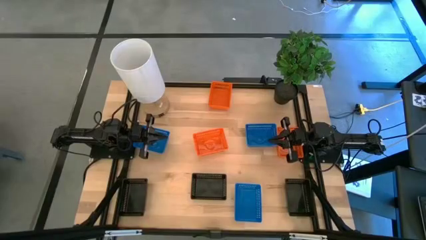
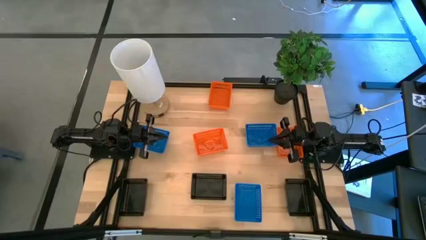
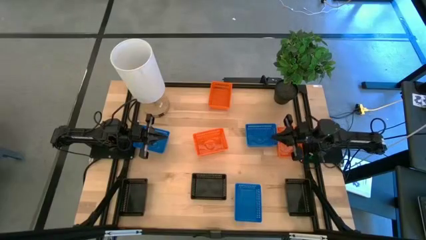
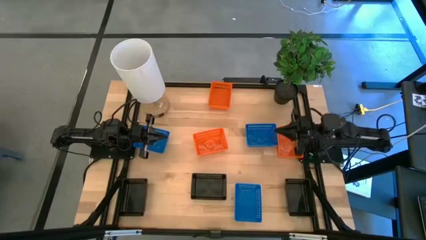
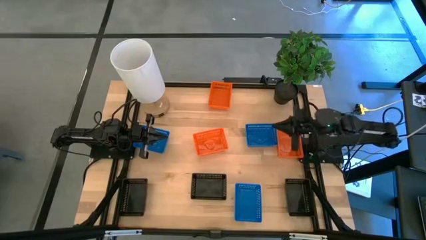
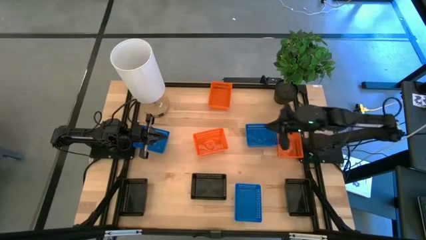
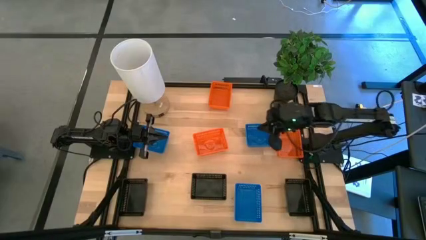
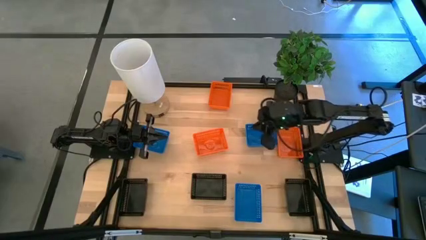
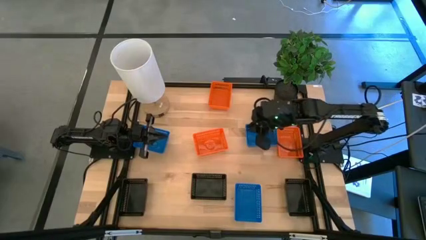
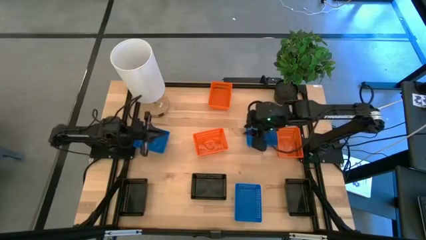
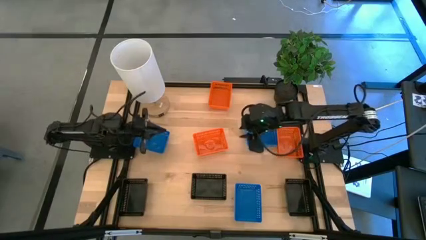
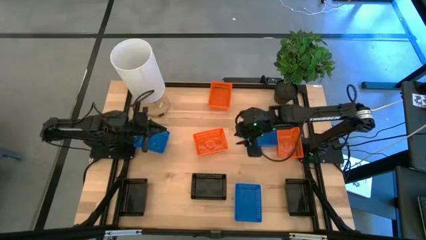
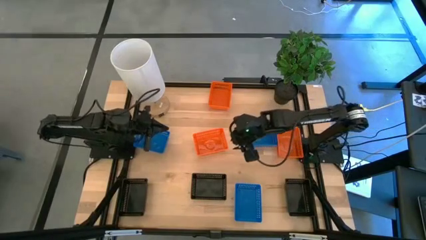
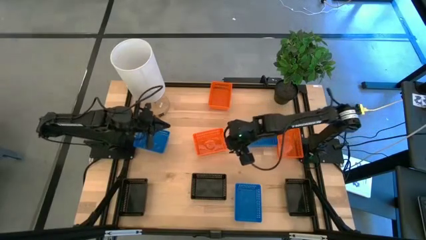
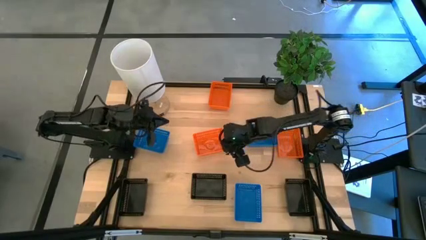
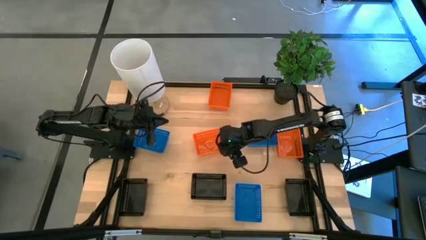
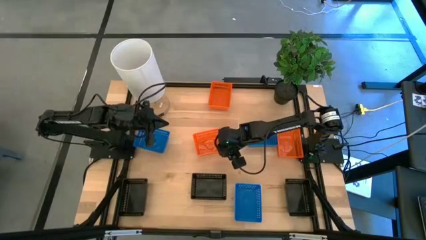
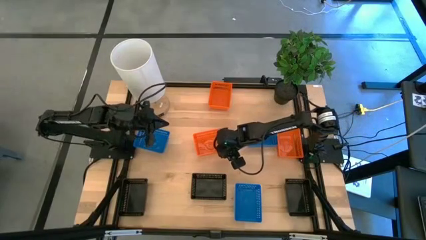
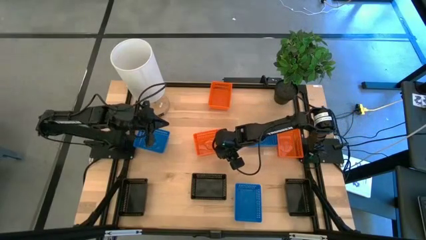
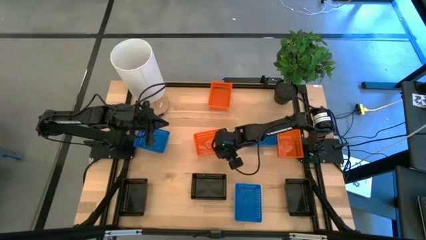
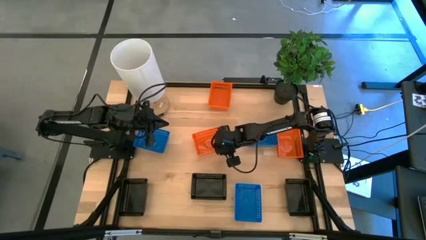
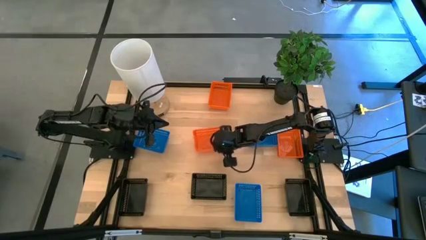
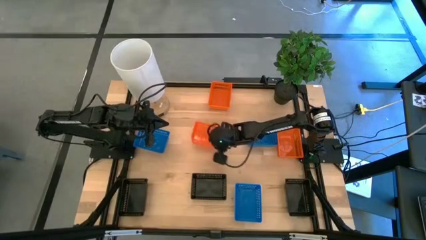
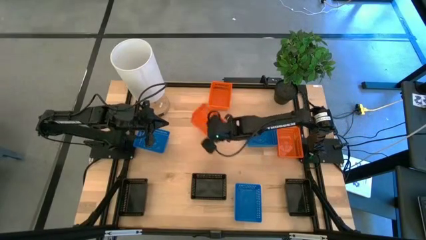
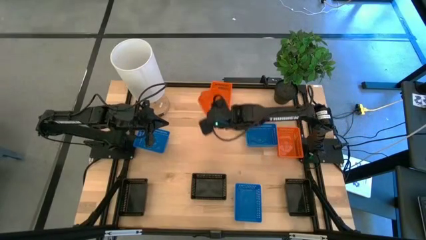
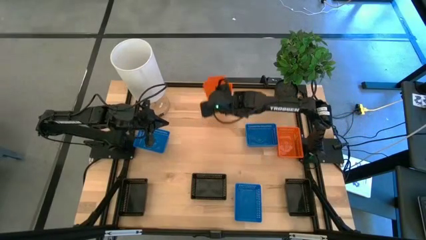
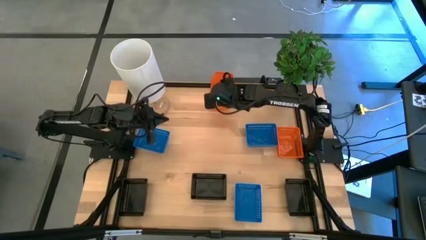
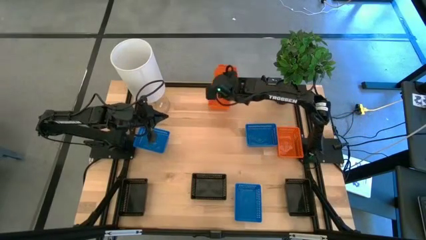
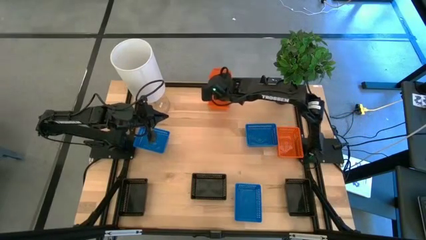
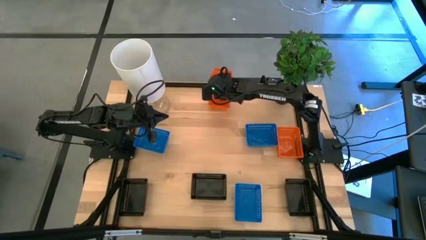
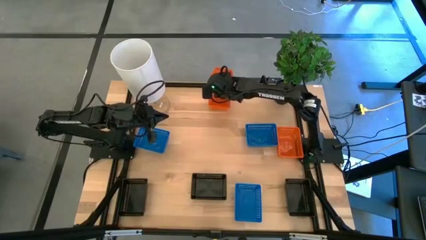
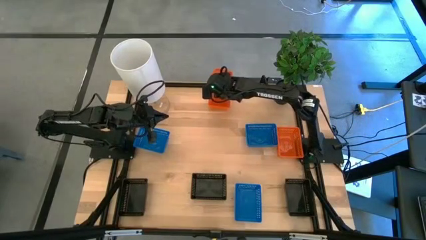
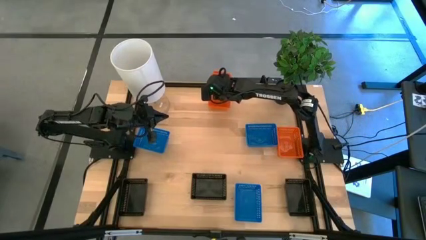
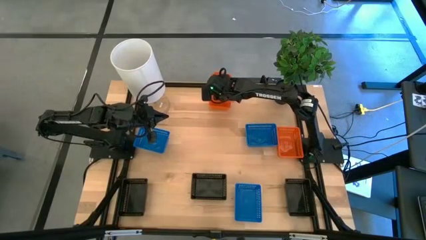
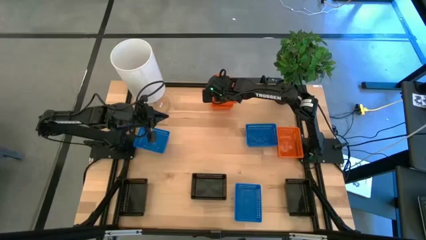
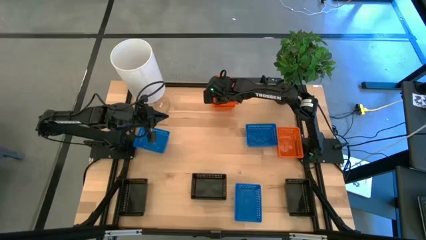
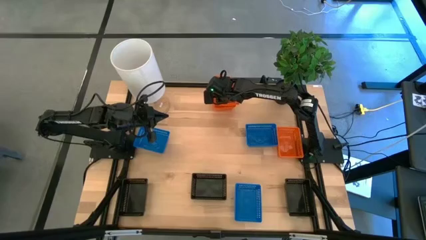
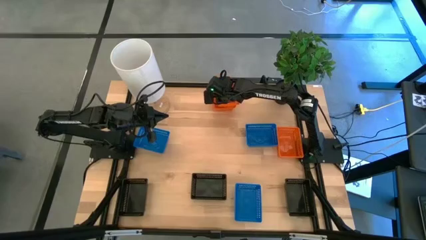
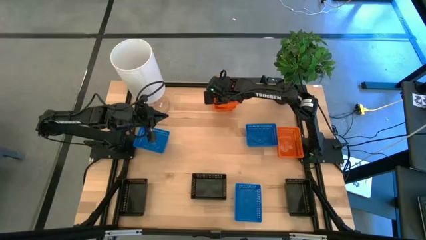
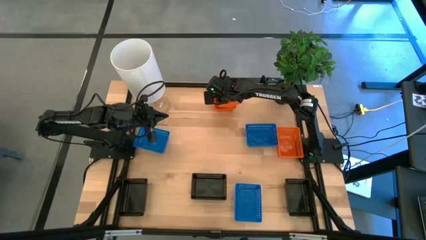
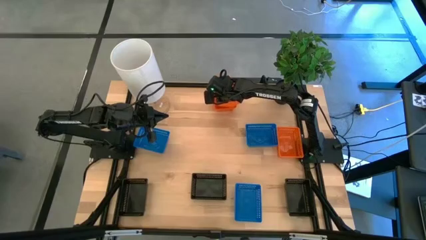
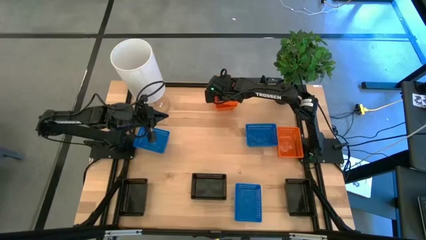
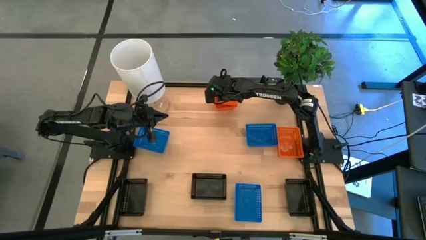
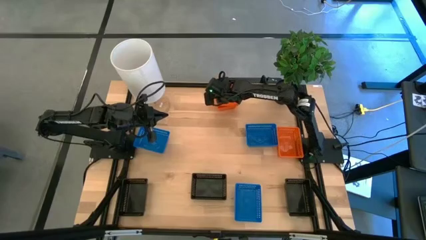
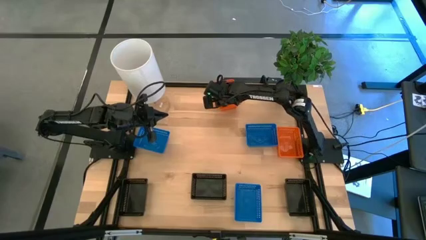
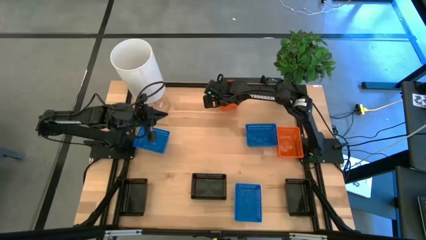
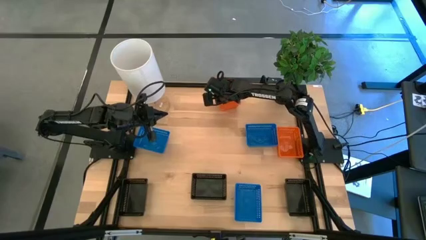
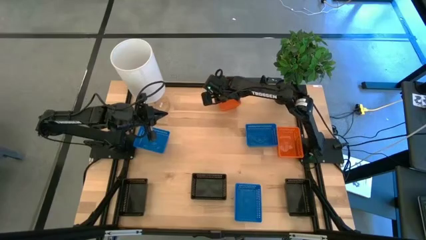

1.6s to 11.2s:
Stack the bottom left orange basket on top of the middle top orange basket on the table

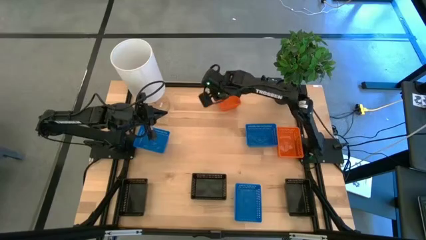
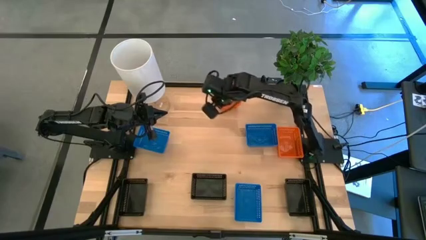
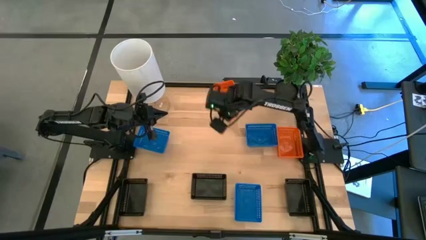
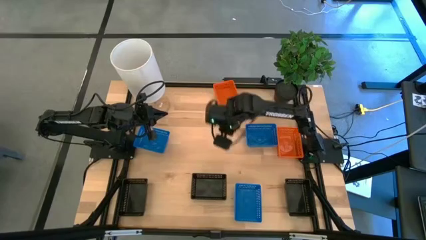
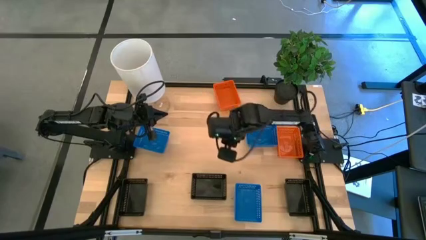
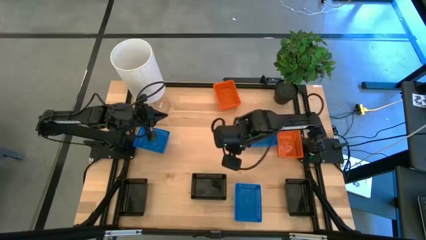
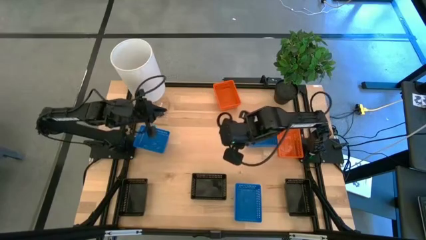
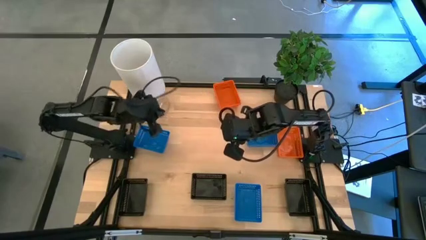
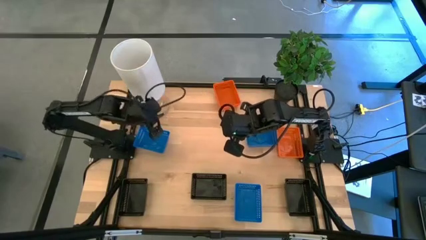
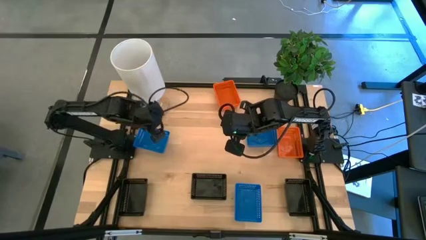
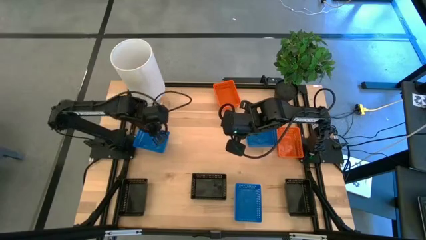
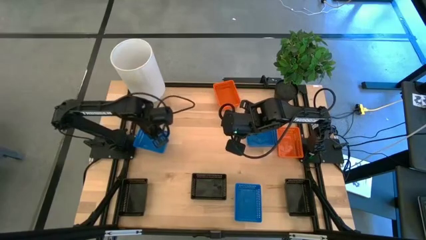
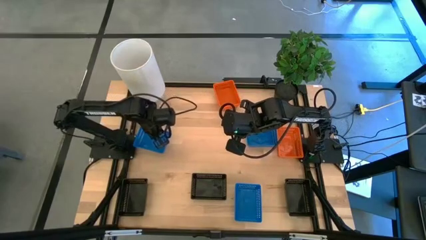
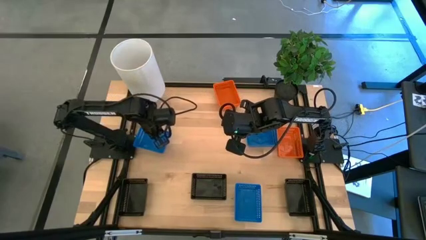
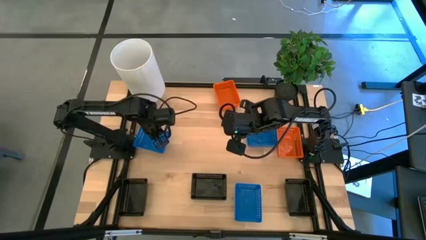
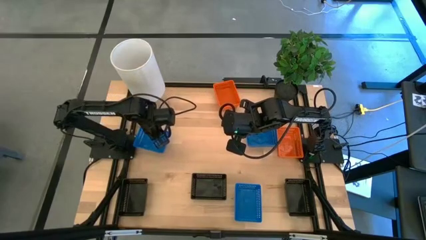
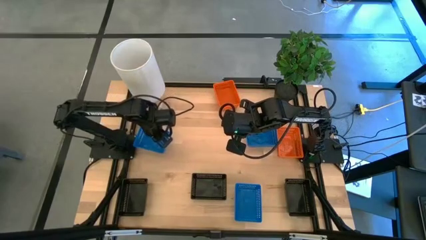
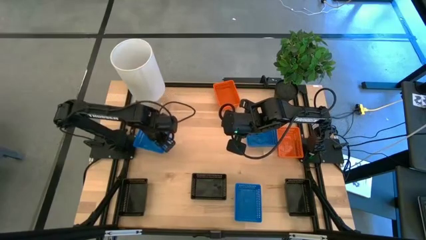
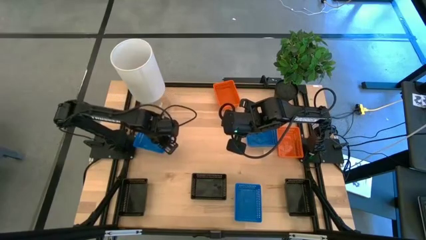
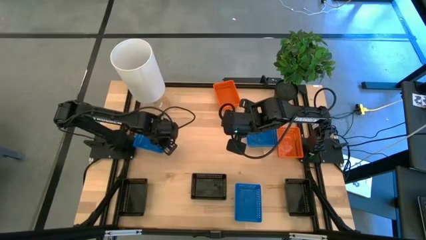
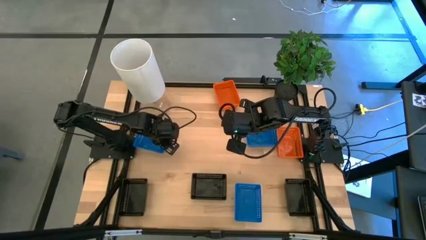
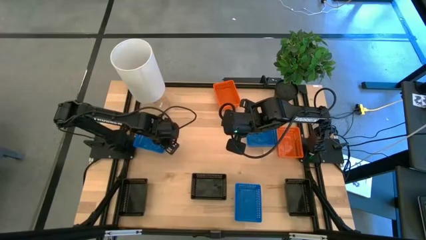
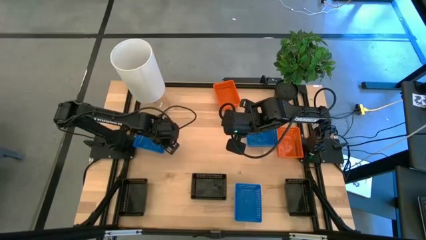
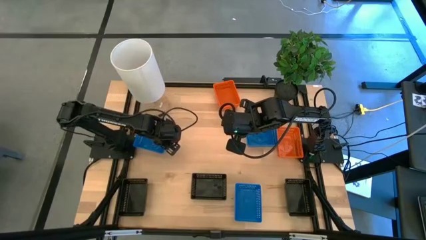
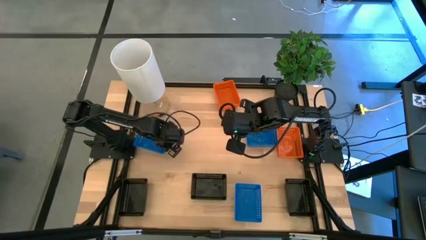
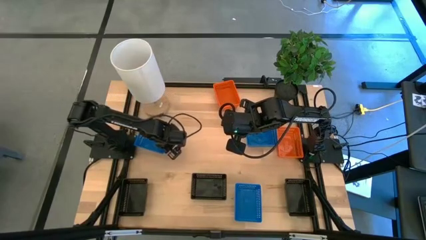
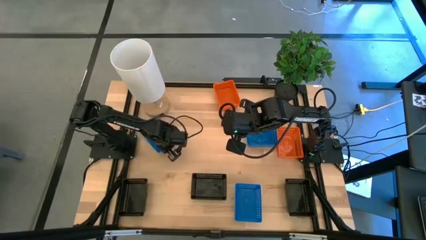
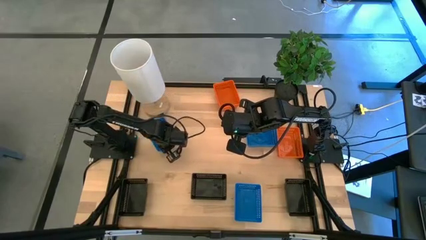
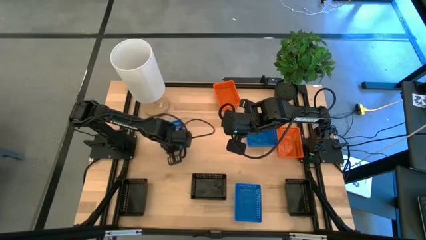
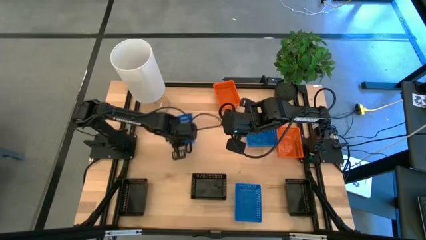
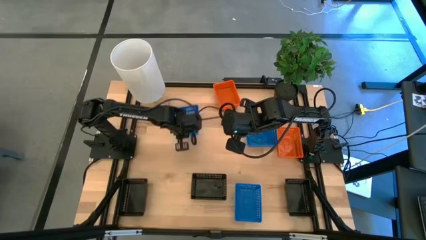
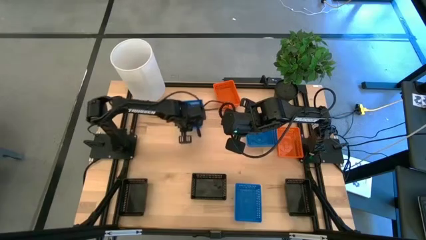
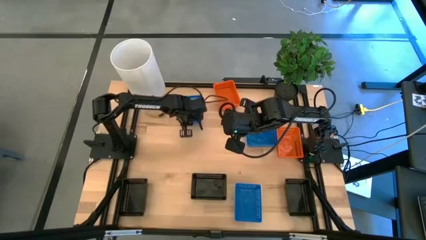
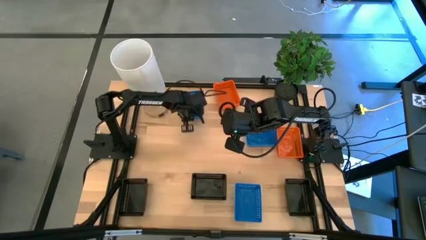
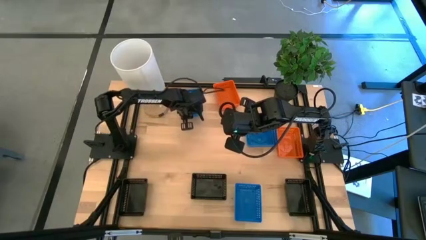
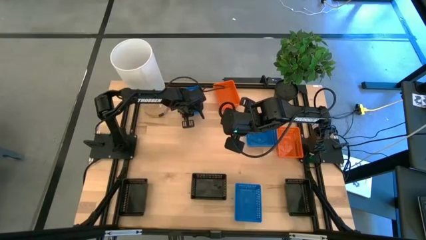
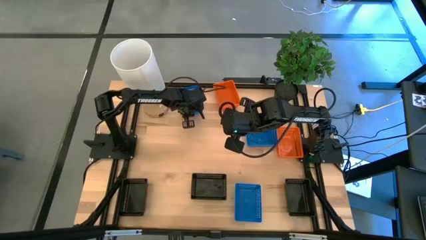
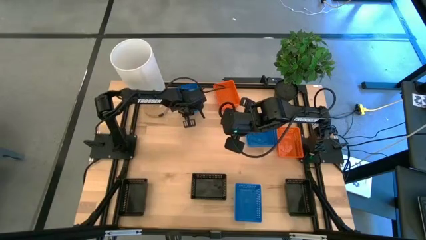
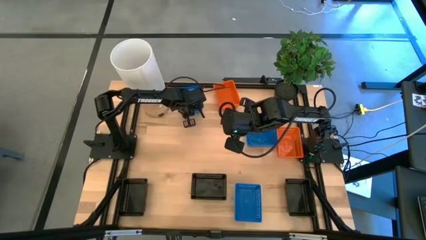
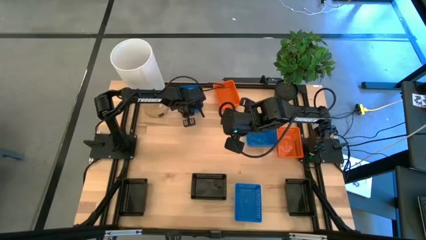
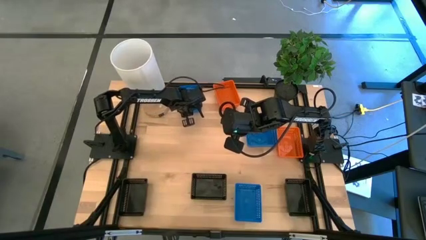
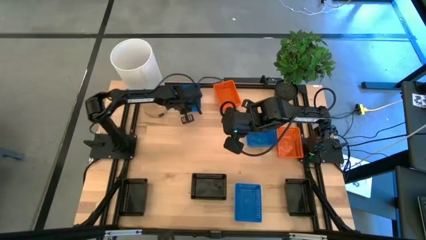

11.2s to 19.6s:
Move the left blue basket to the top middle of the table aligned with the orange baskets
